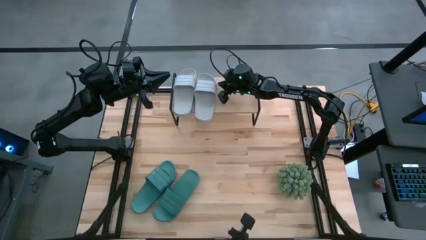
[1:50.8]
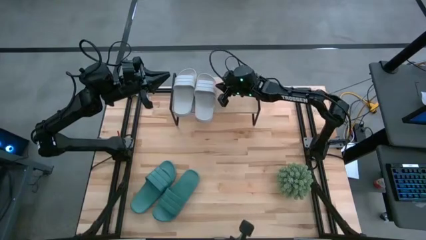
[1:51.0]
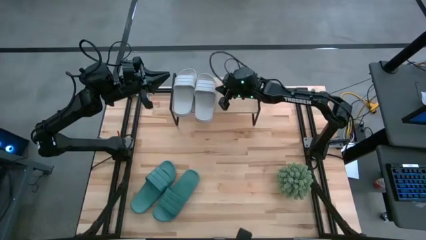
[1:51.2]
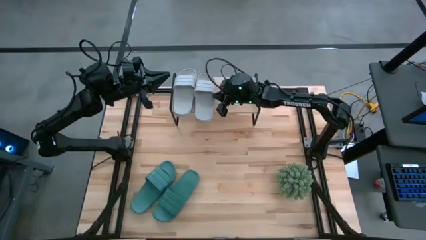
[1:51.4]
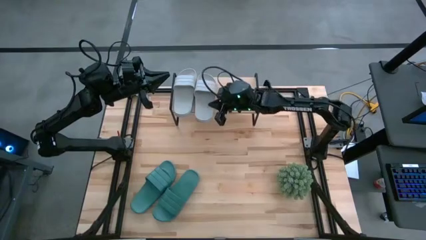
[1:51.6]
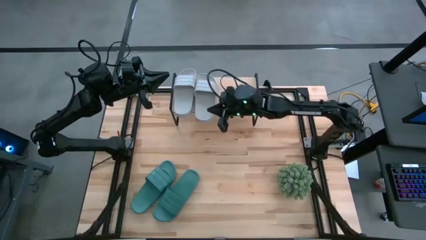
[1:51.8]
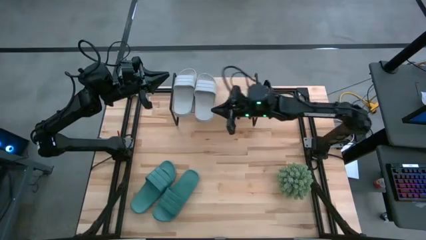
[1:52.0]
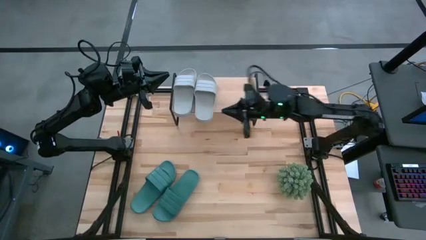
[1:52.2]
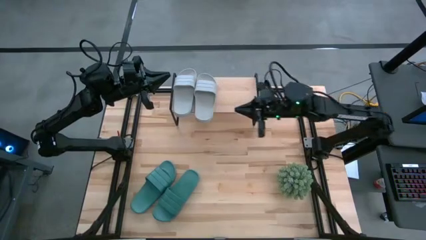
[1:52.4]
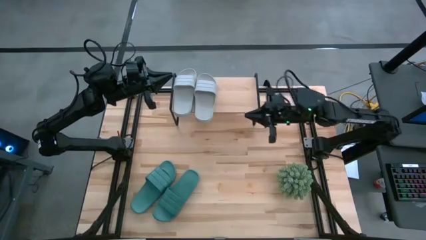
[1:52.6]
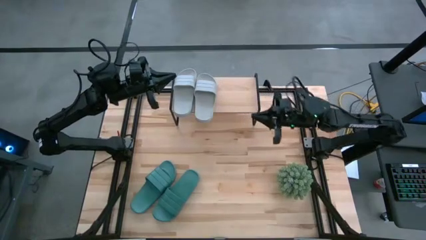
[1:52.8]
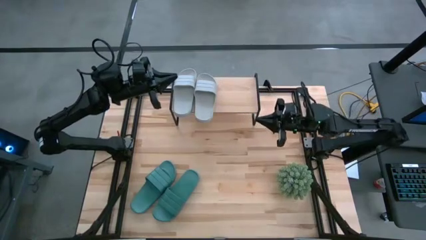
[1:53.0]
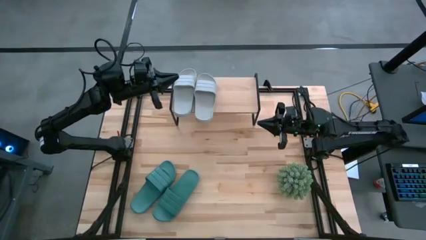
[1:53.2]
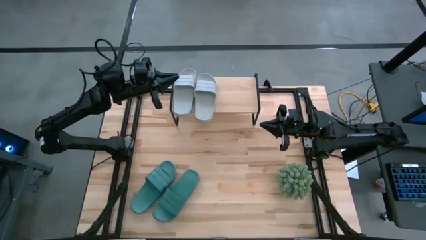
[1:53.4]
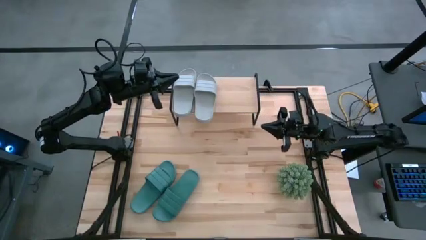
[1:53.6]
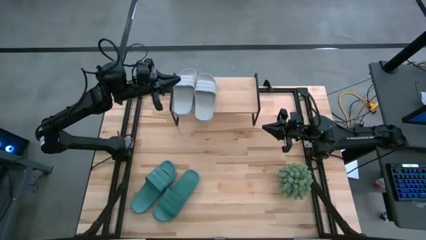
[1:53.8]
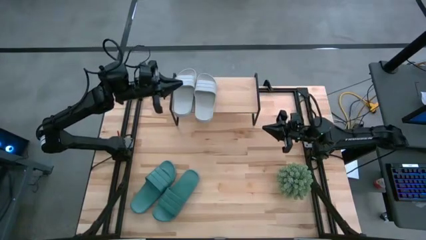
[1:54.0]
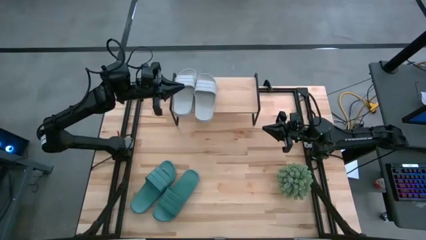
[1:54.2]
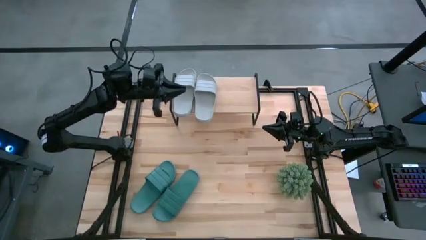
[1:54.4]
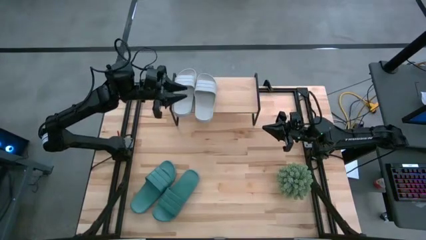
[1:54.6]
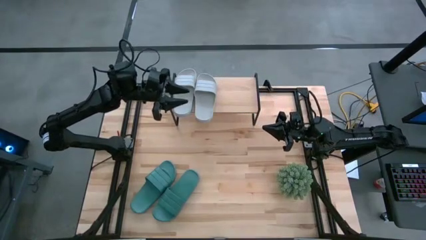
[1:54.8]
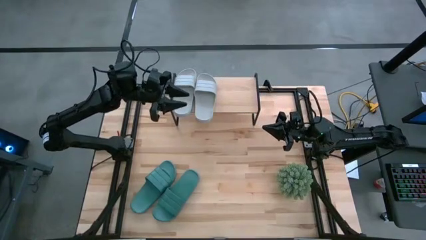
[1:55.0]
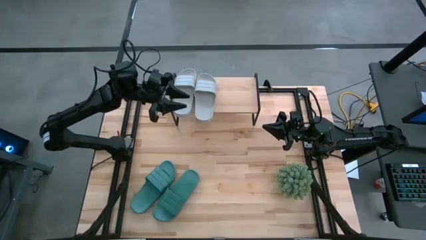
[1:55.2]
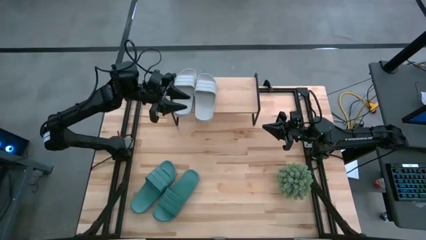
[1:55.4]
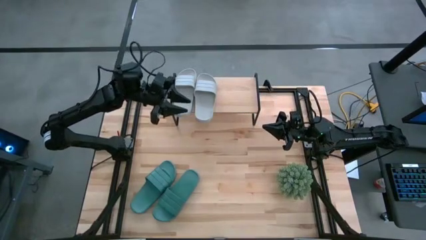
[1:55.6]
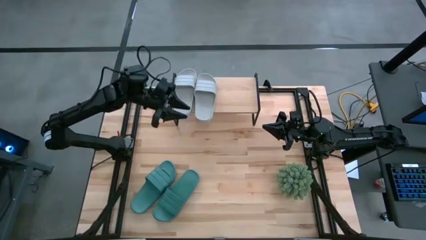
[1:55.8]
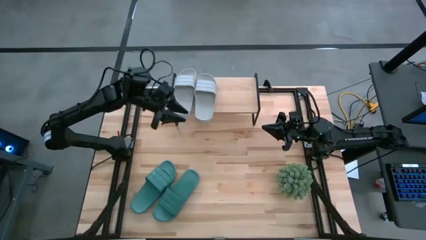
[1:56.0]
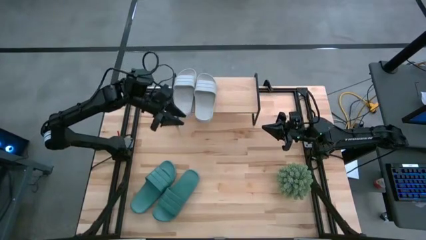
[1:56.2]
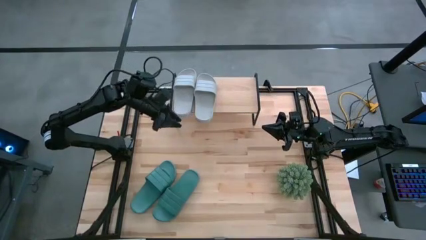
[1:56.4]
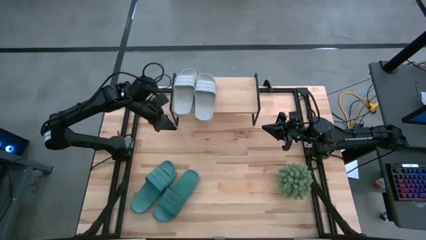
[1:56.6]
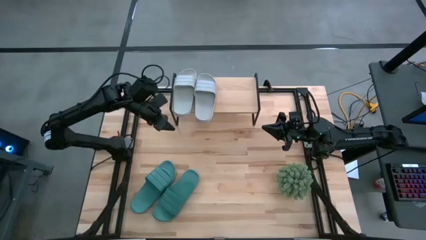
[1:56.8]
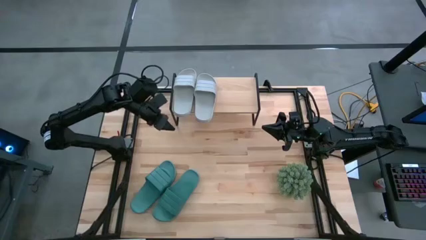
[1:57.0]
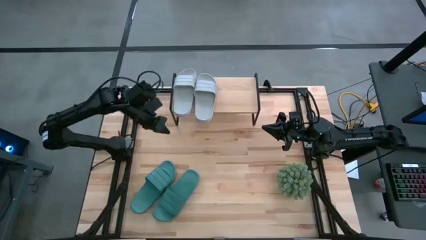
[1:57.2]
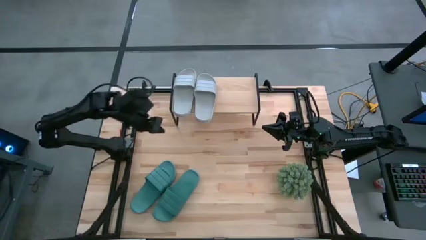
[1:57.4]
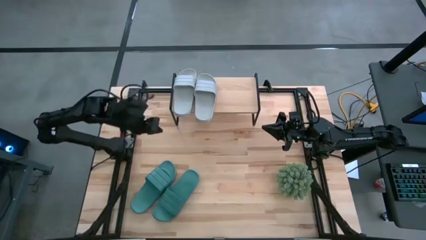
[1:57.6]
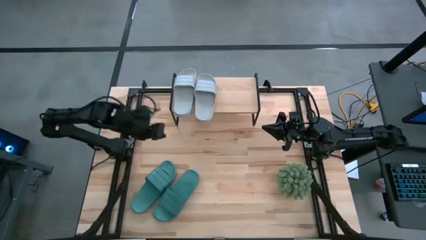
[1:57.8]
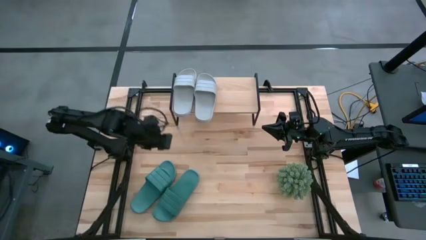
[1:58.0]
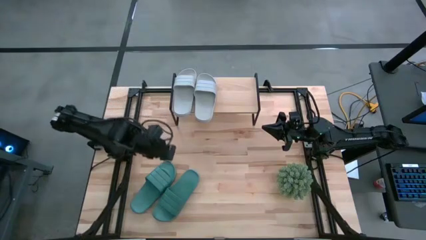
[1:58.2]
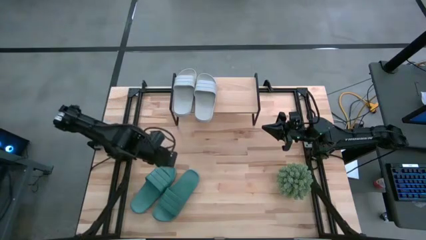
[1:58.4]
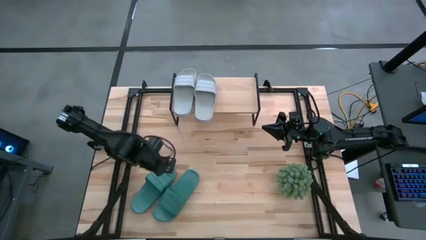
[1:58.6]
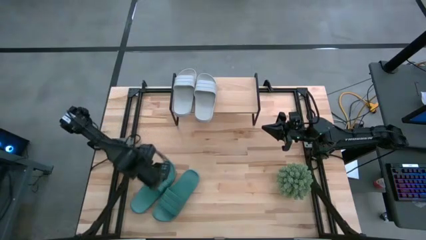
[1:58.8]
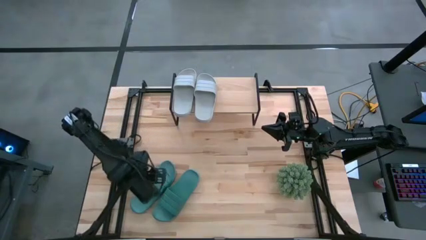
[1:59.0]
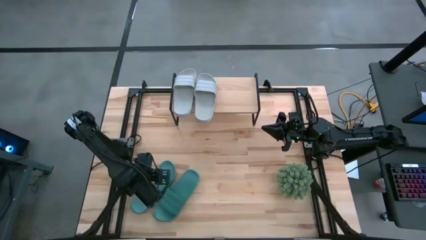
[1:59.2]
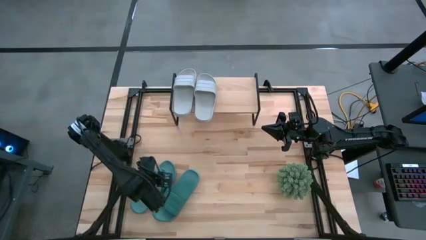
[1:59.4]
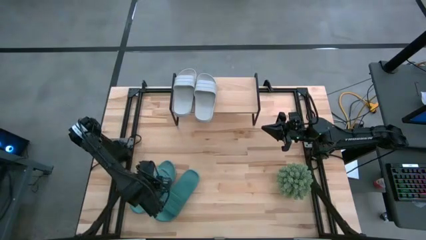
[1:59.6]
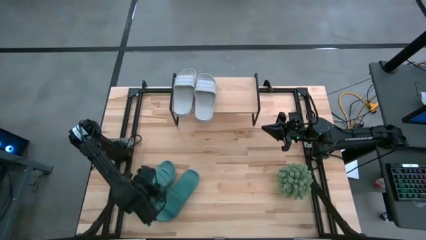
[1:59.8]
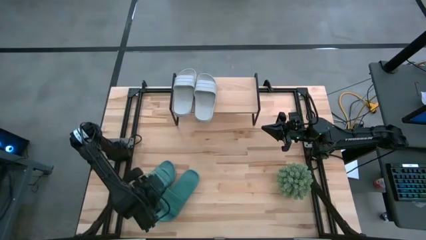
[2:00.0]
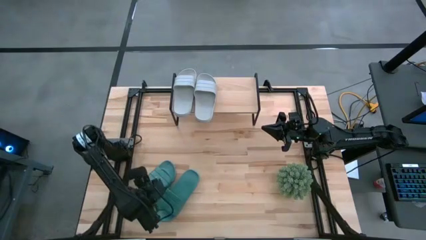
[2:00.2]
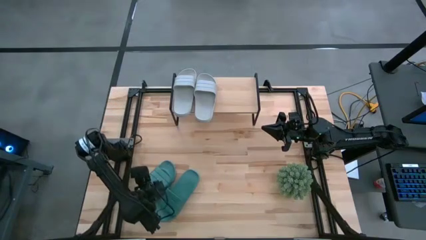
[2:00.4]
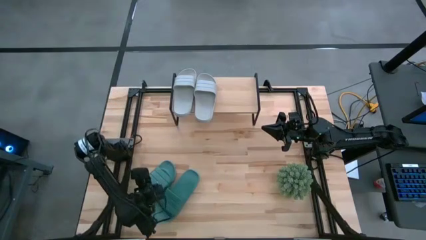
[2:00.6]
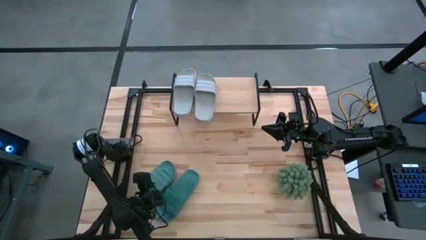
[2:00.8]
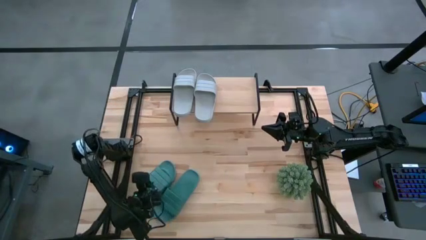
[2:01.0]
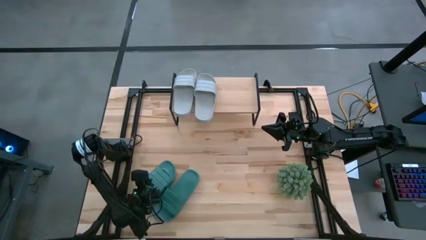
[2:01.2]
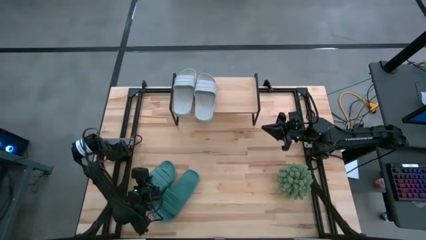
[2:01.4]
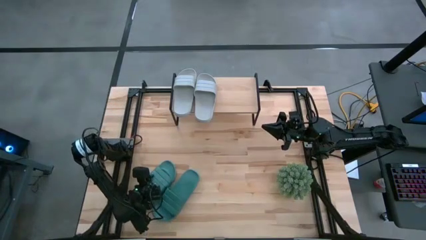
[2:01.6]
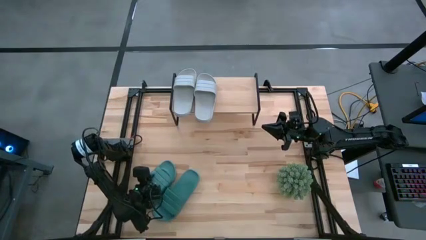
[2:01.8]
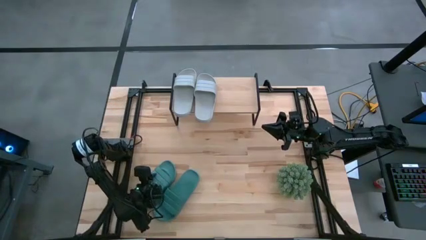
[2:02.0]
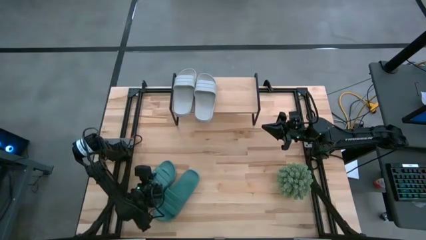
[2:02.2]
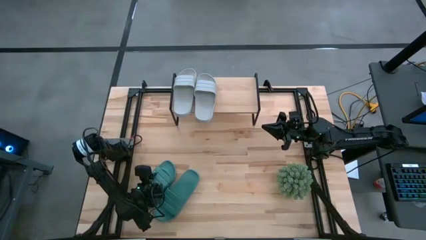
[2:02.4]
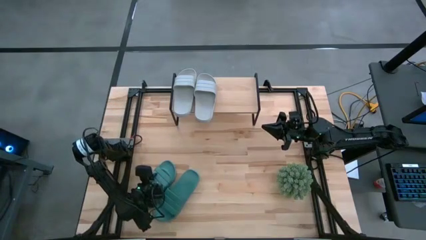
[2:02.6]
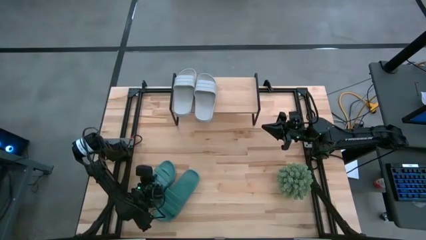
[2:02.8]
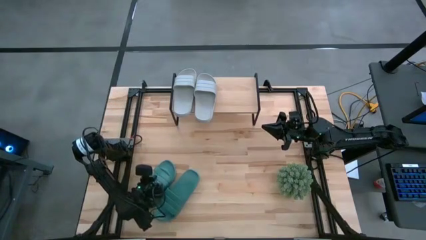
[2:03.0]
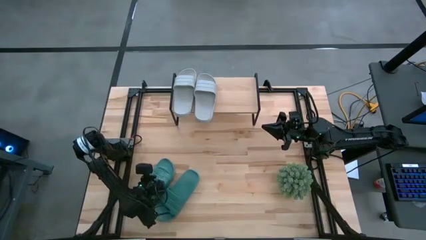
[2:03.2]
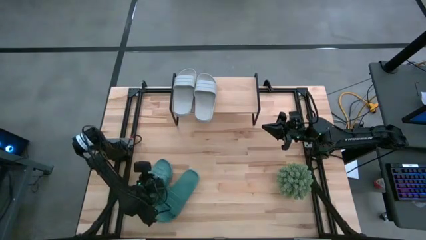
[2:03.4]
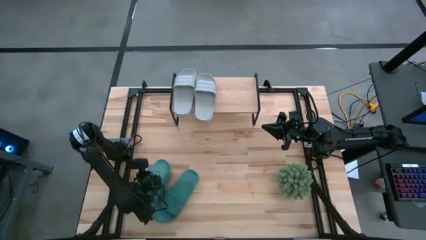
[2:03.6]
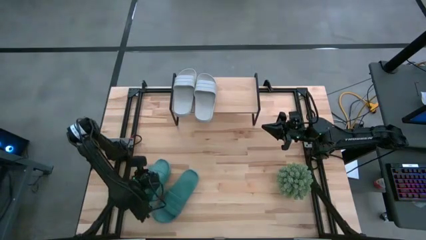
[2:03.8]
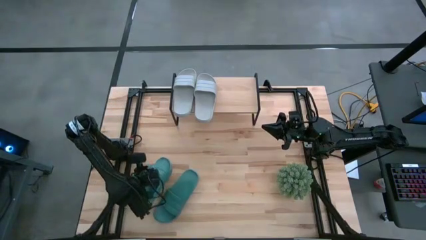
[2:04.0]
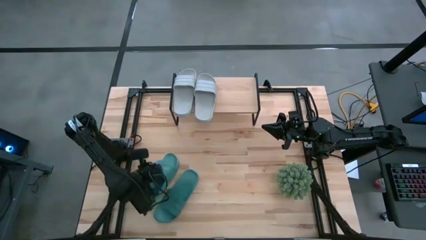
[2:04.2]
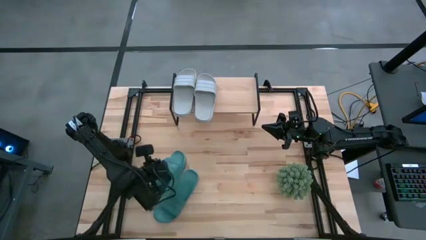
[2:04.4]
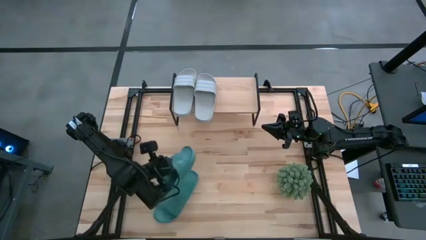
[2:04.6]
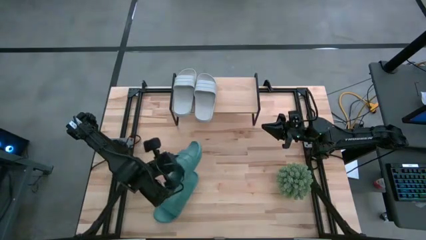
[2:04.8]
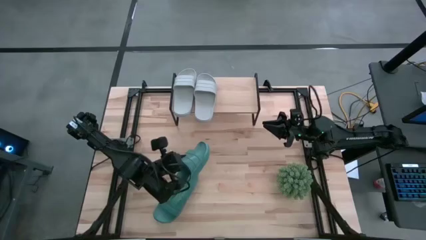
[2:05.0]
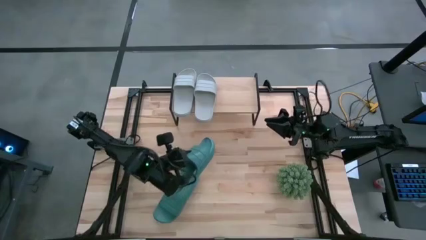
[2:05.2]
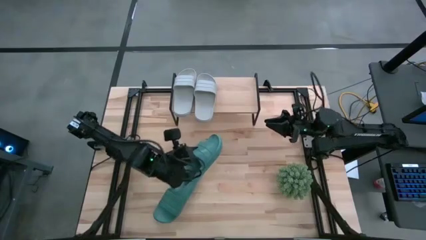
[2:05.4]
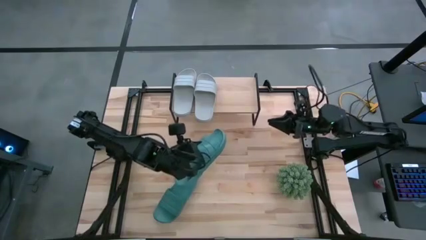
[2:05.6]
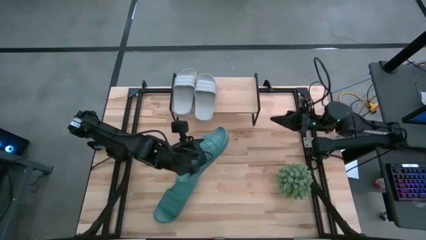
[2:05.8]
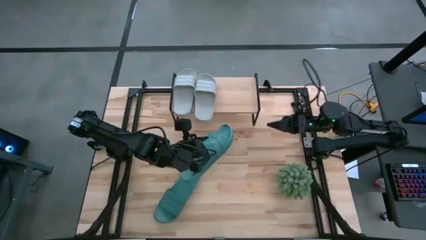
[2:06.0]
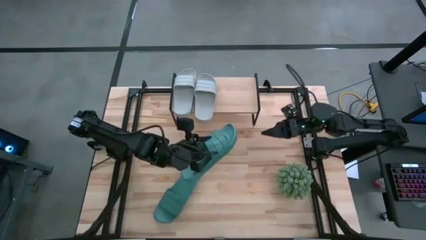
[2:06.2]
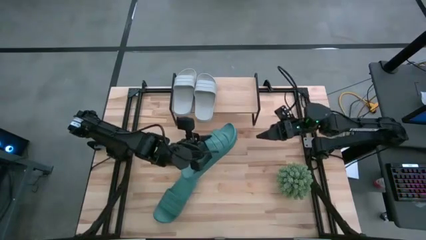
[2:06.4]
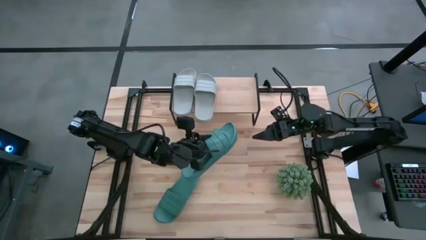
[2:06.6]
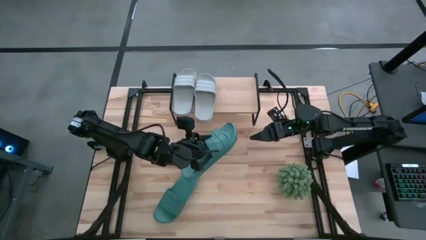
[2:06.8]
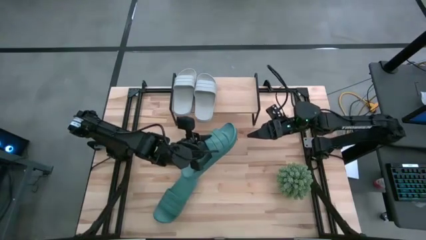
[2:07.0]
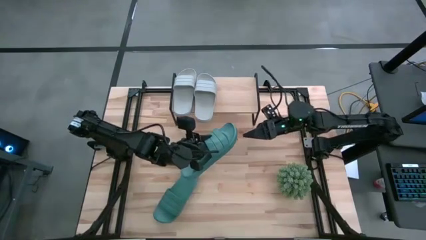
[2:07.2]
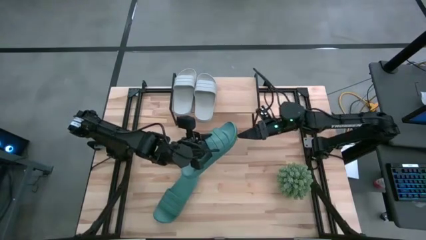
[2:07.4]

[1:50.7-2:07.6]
Task: Pick and place slides into the shelf
Put the left green slide on the shelf
